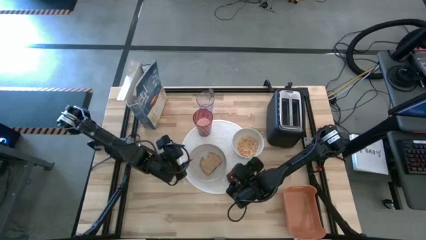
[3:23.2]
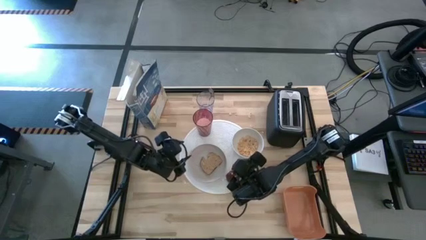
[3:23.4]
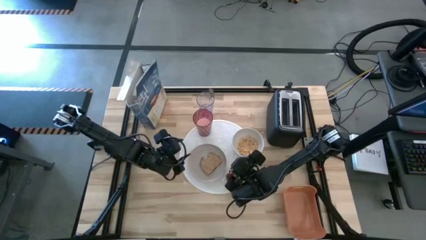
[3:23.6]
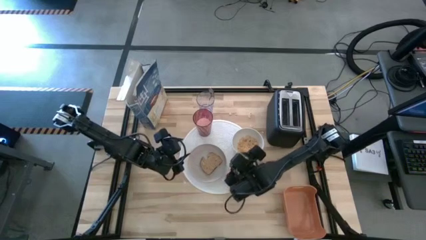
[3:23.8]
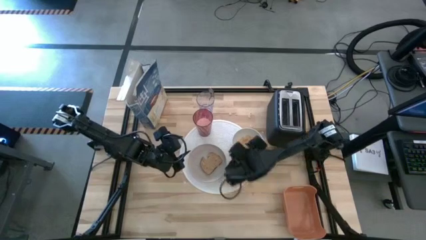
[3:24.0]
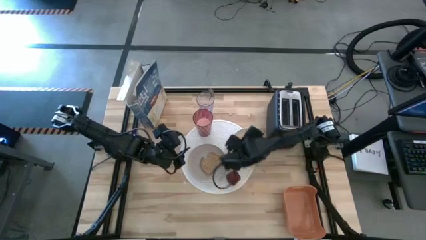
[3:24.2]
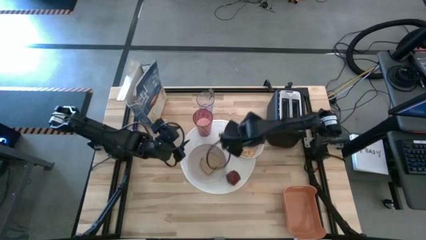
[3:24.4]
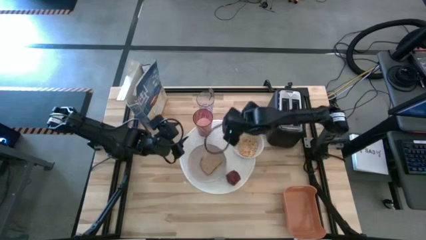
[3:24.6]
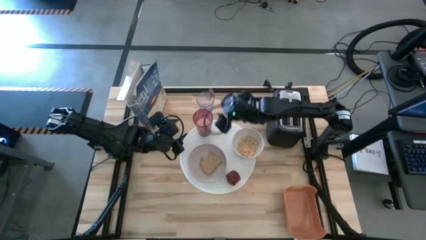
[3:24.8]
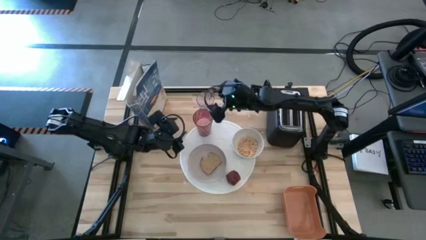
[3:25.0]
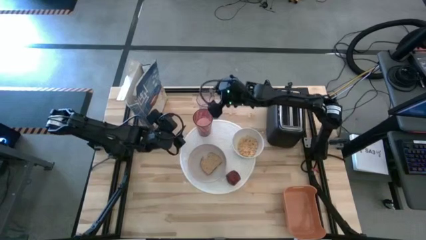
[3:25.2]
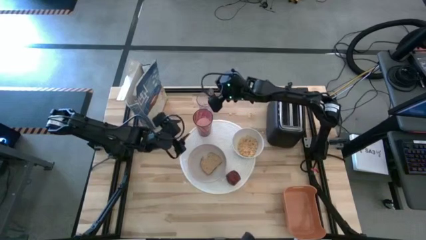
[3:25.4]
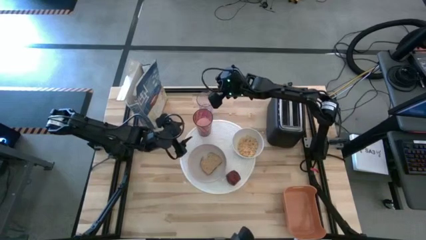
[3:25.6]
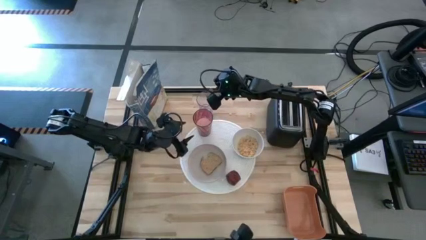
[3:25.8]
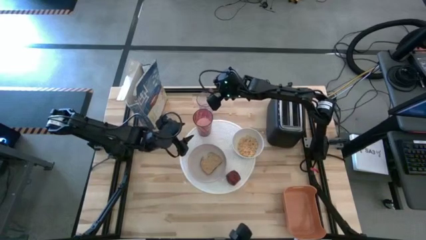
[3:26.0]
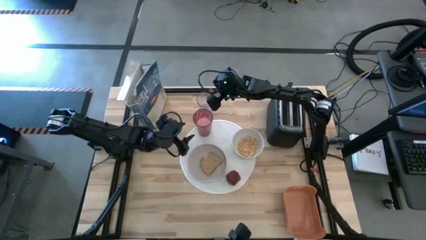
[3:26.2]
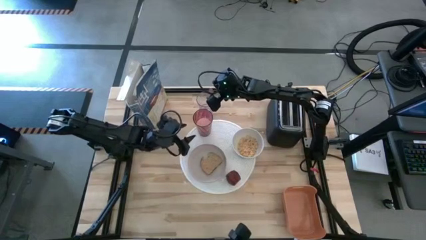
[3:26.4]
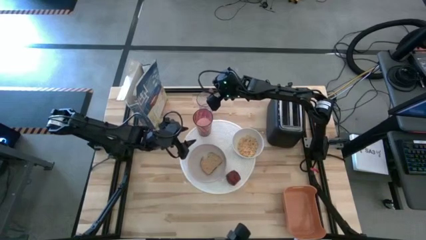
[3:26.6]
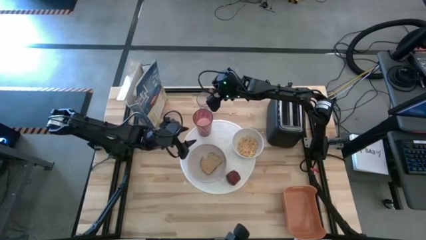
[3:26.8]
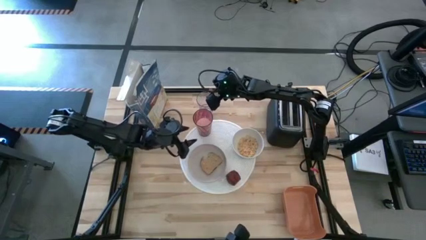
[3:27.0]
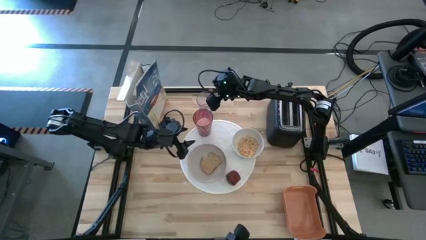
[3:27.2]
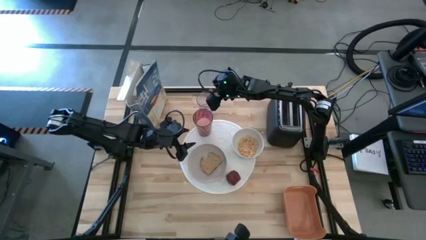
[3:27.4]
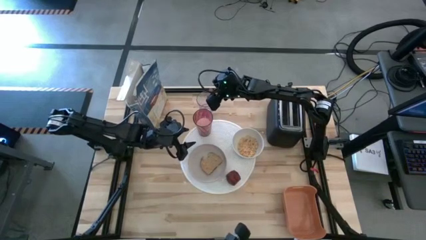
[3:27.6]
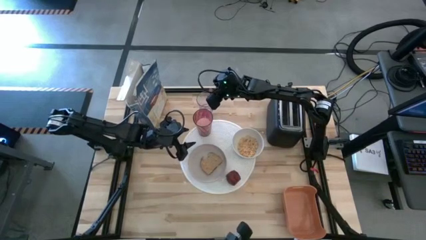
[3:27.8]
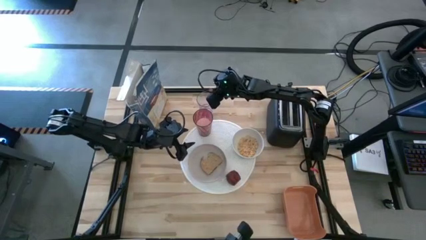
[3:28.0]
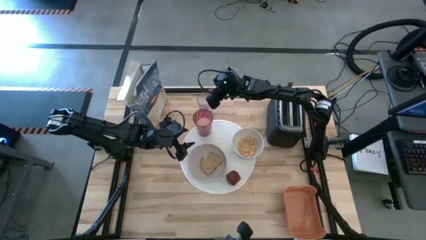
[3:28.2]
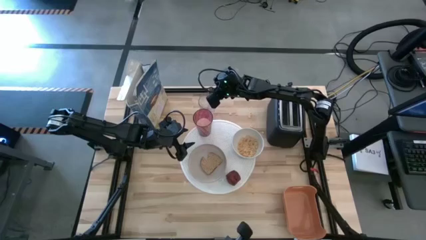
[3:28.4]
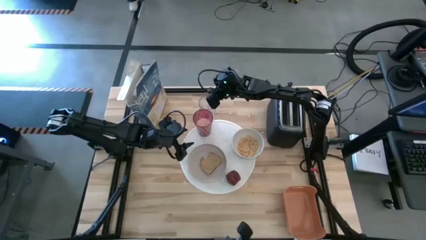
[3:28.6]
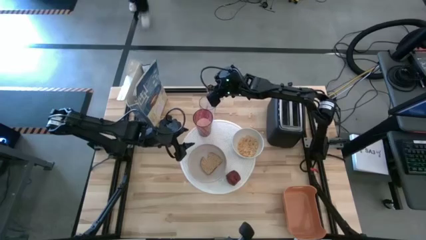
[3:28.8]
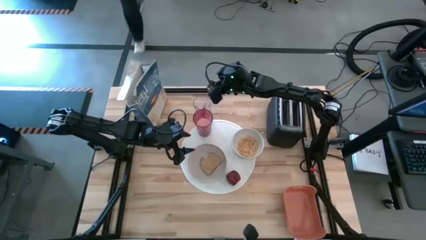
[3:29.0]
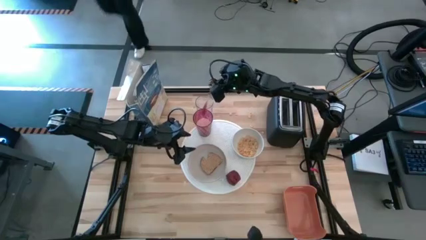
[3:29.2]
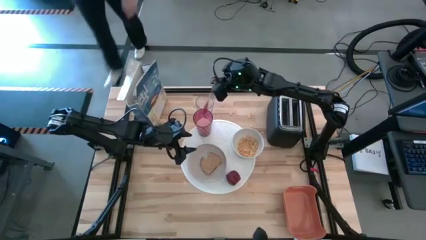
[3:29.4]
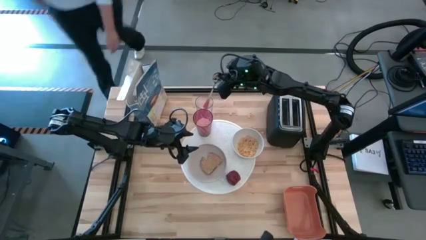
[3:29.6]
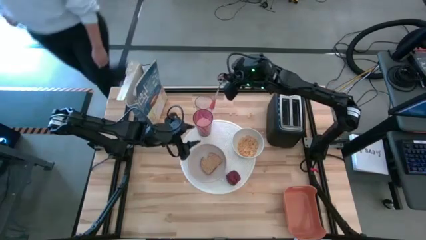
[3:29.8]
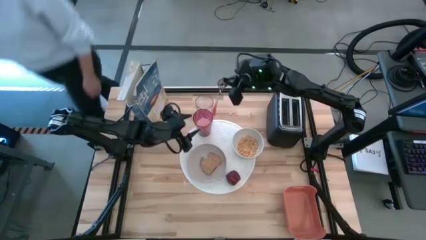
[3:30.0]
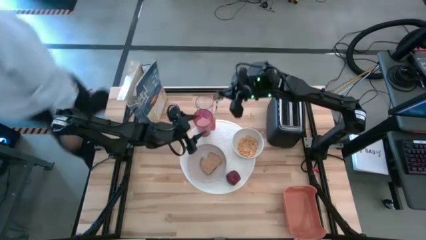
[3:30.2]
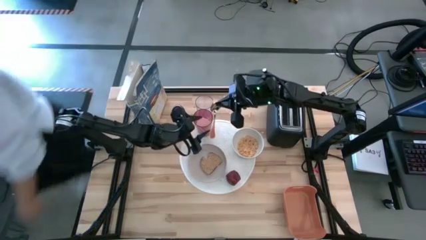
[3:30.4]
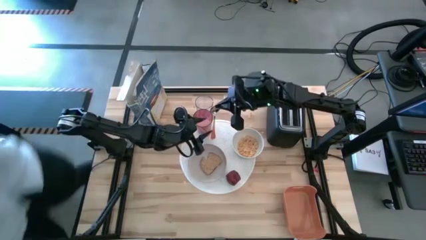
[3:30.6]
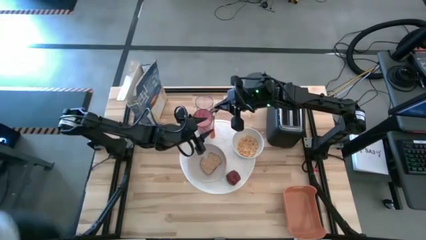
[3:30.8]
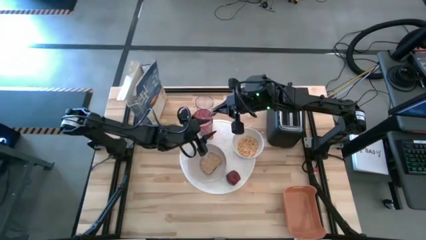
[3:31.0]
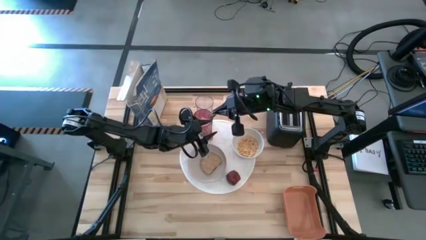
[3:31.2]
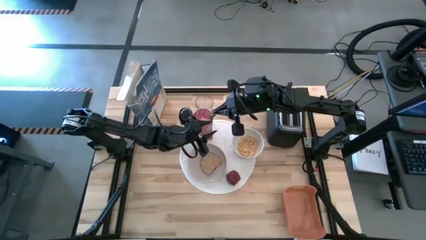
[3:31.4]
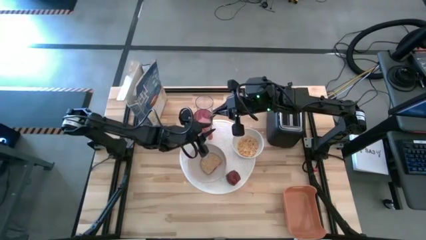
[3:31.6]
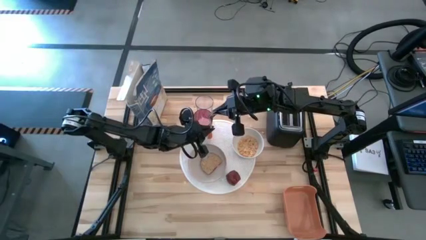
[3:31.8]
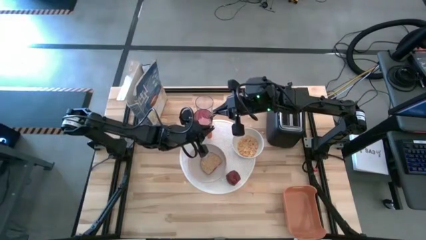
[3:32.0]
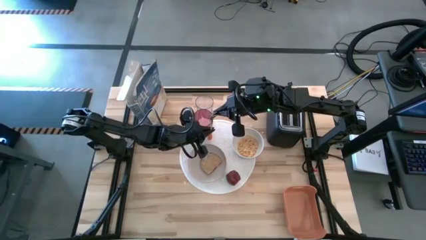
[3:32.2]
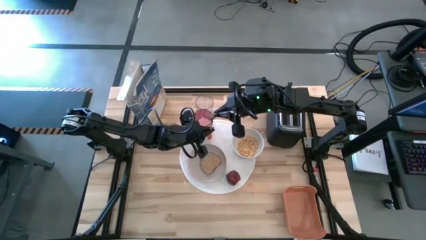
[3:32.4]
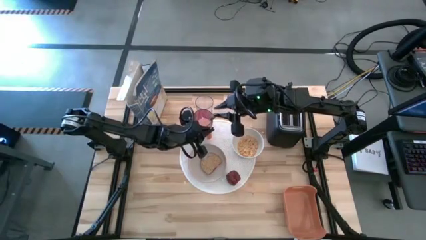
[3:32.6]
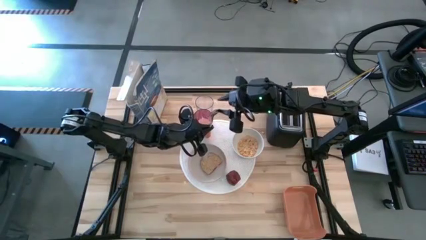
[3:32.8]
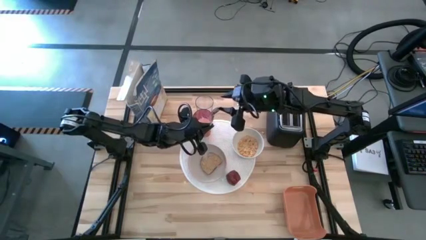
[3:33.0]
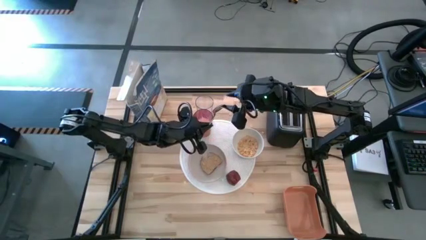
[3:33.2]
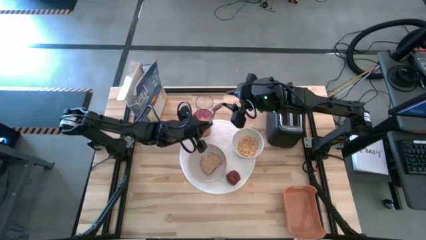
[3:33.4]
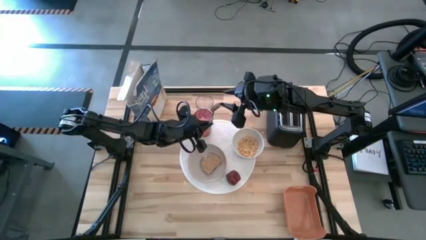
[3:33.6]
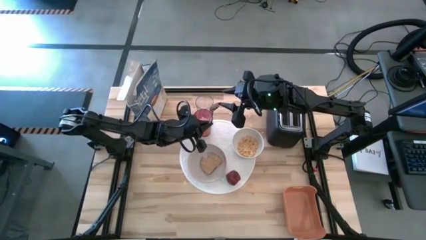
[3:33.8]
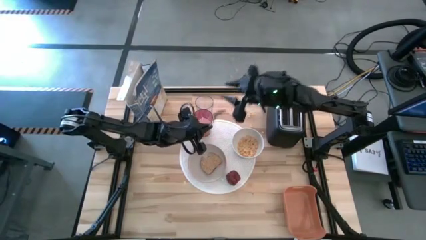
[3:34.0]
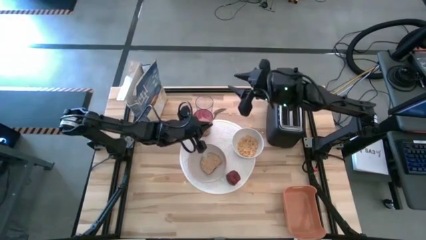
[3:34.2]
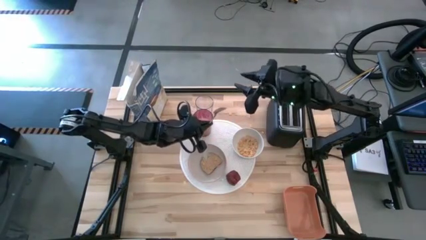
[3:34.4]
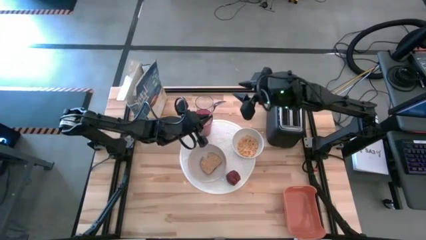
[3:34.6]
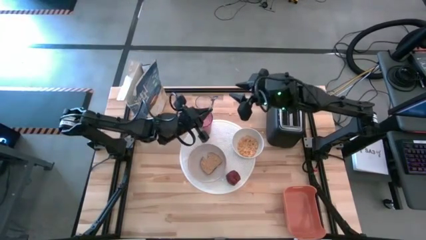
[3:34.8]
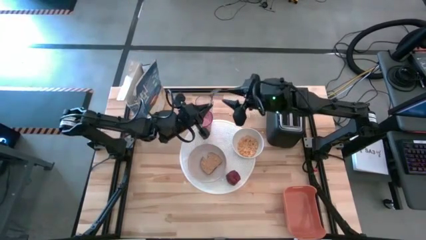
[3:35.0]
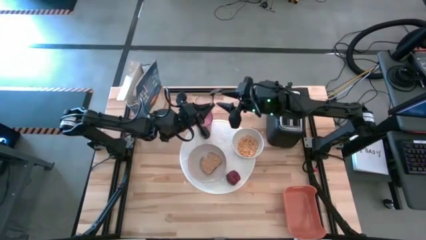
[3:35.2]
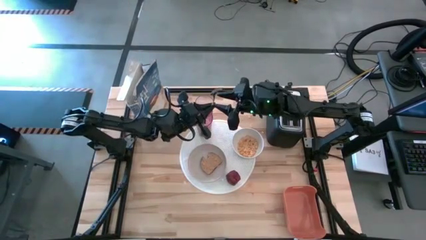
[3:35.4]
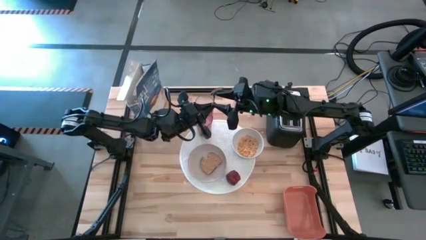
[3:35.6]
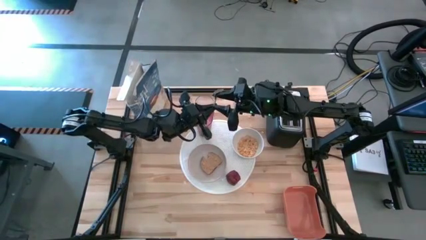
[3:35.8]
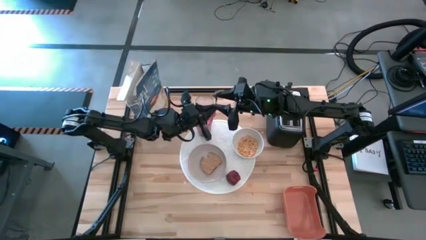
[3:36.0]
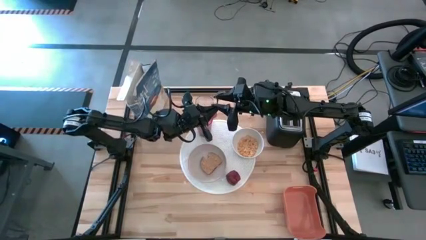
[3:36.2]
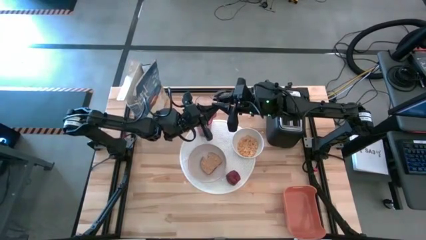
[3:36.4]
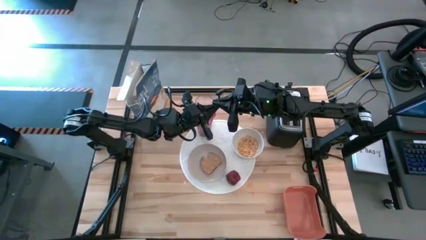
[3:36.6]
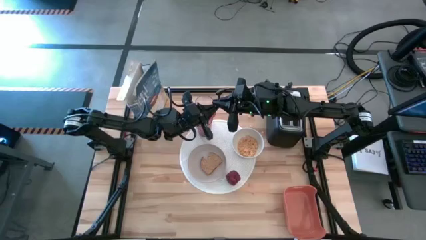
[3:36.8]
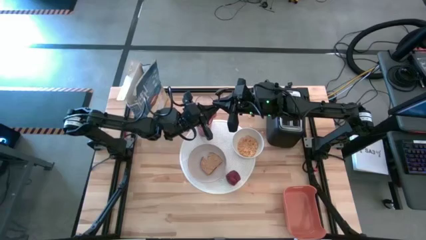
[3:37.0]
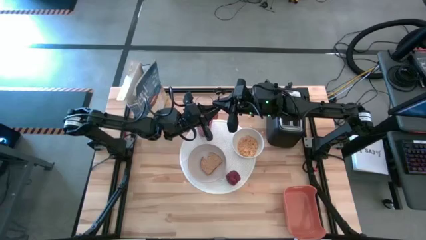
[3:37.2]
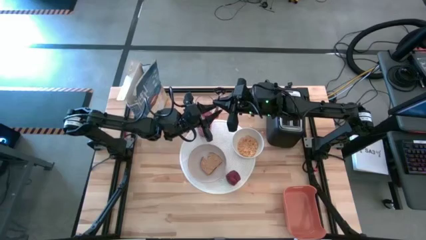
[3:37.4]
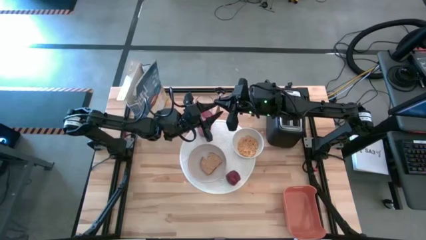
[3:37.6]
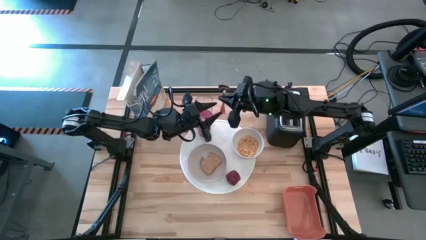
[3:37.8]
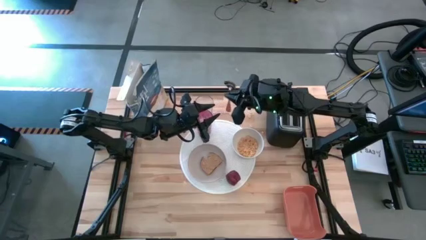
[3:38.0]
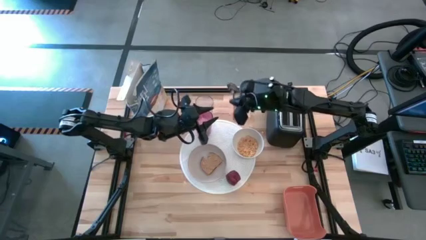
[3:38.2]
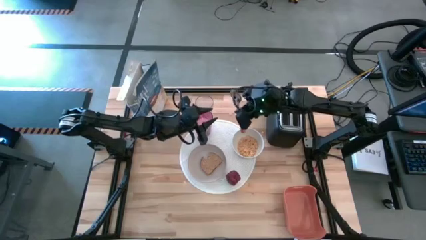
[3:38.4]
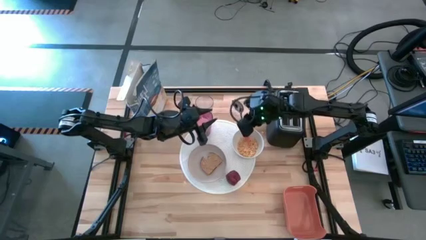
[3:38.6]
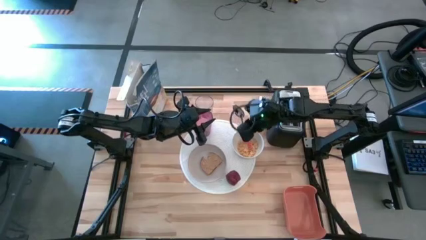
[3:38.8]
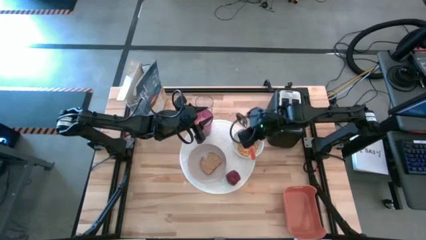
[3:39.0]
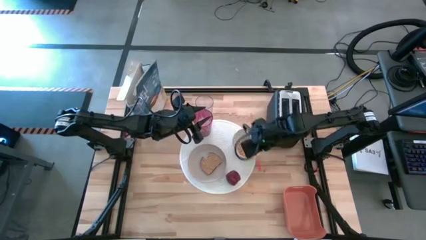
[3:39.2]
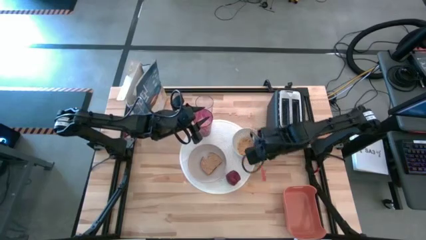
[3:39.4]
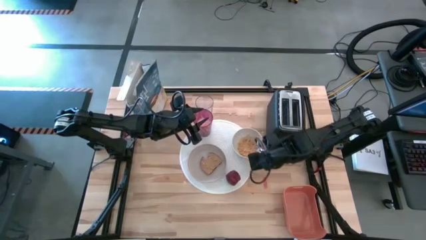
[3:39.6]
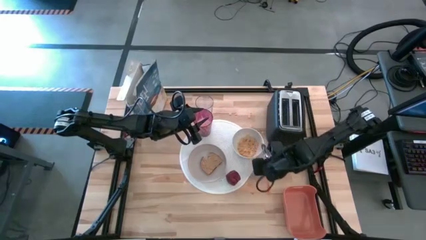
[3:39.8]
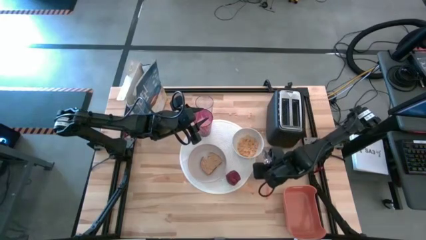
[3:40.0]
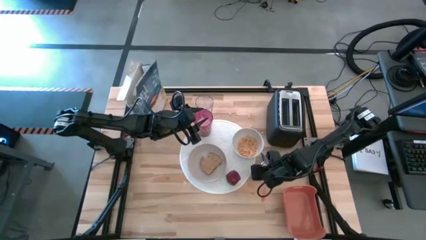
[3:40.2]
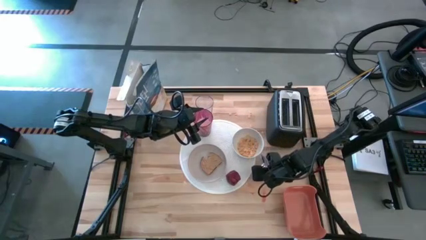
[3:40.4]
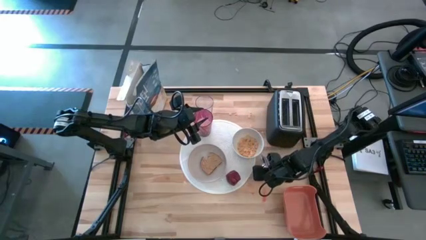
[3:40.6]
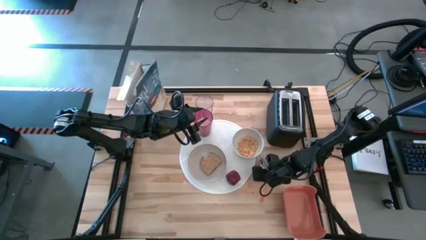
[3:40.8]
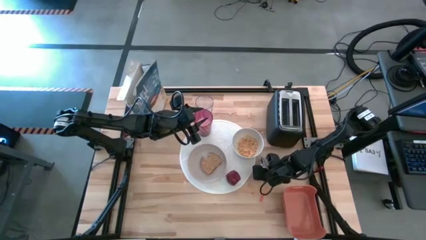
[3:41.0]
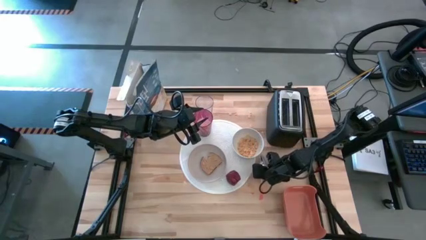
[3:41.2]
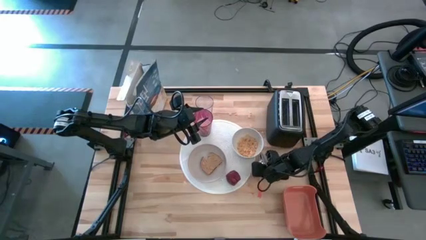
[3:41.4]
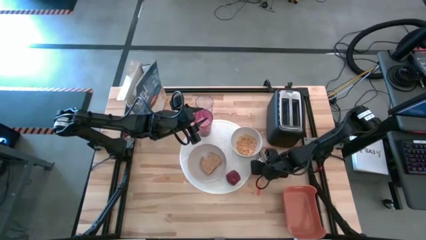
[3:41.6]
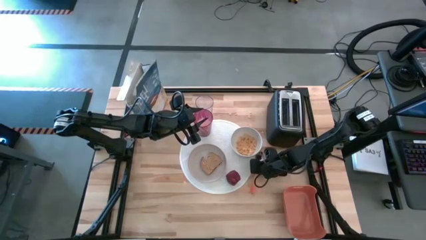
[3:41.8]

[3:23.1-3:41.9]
Task: Arrange a breakfast setting
Put the orange spoon to the right side of the white placemat
